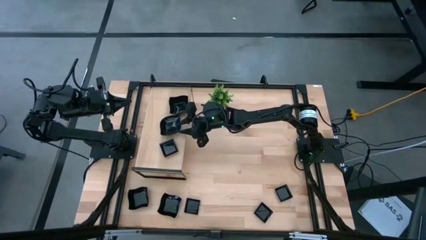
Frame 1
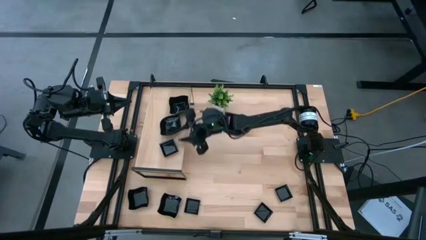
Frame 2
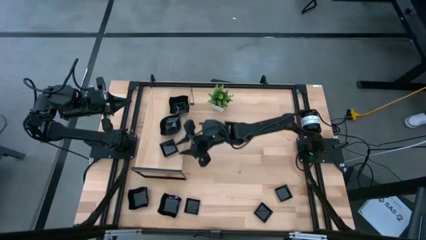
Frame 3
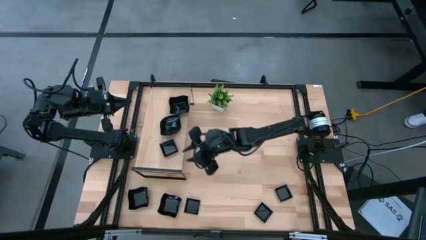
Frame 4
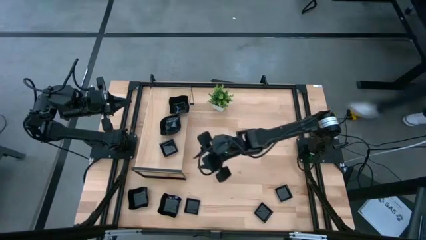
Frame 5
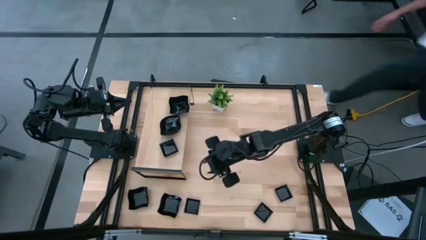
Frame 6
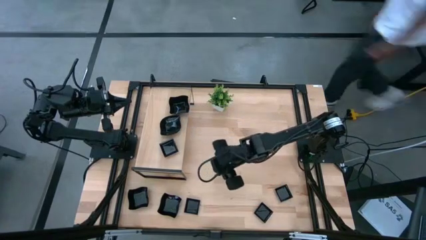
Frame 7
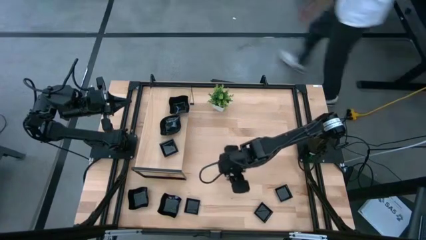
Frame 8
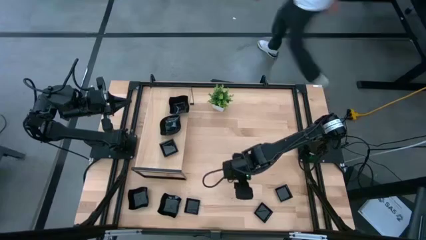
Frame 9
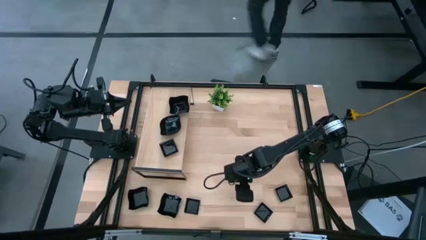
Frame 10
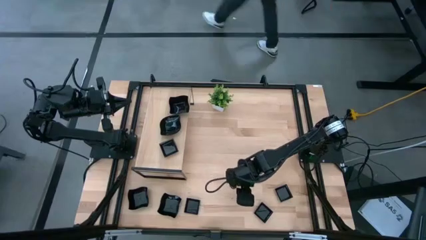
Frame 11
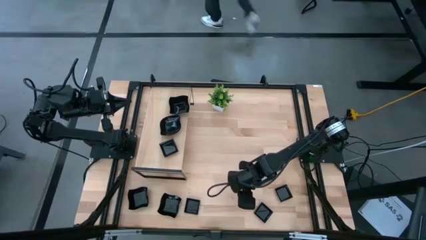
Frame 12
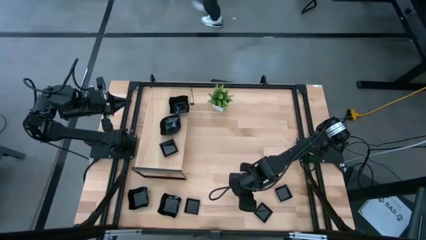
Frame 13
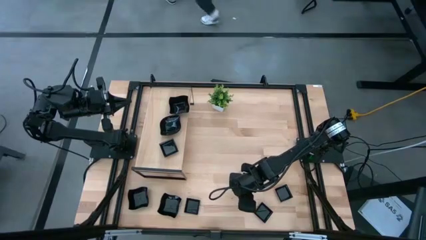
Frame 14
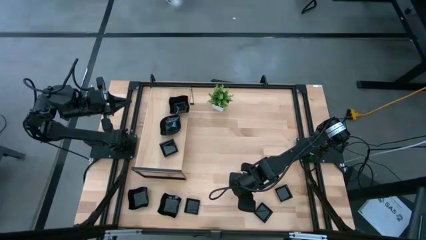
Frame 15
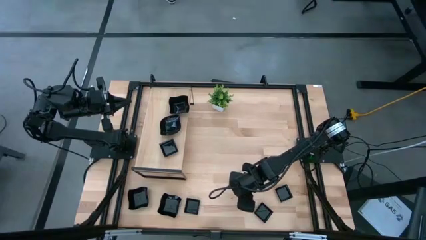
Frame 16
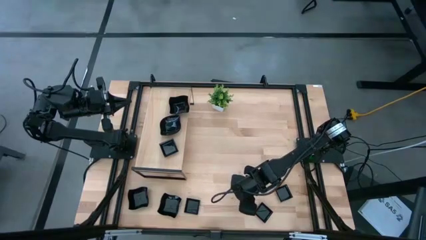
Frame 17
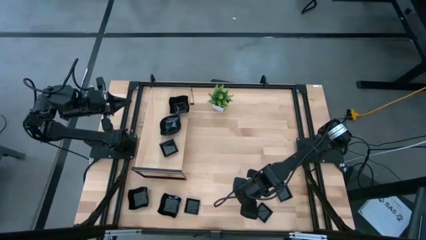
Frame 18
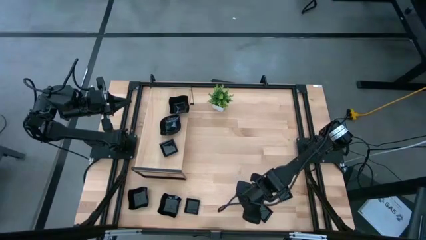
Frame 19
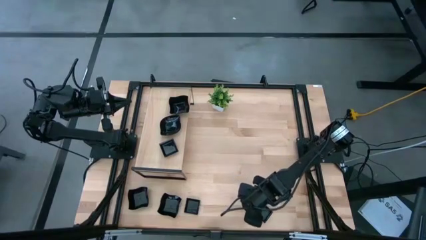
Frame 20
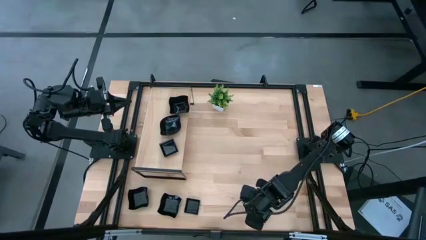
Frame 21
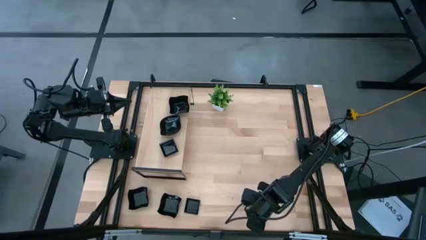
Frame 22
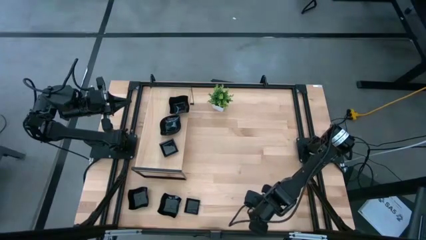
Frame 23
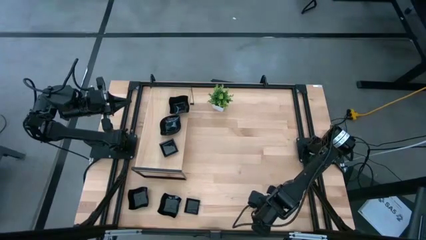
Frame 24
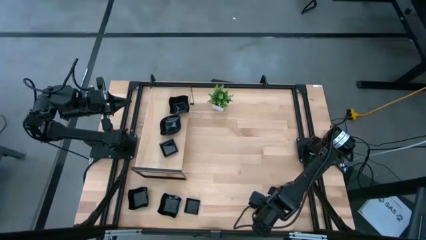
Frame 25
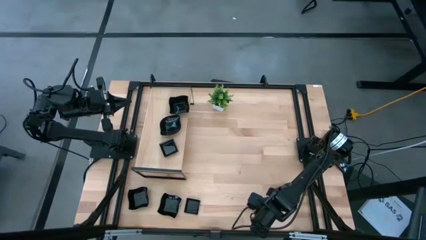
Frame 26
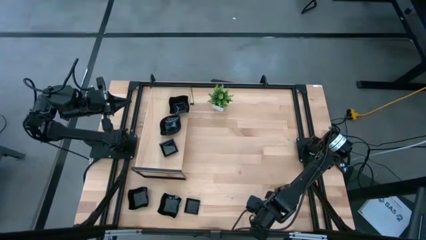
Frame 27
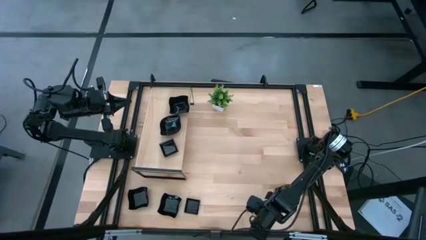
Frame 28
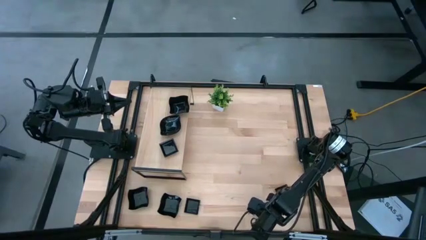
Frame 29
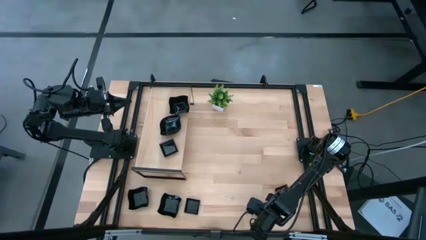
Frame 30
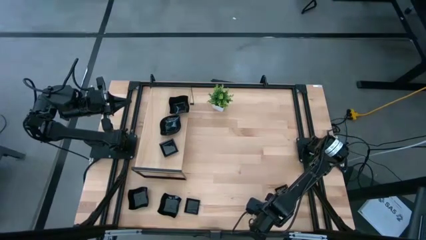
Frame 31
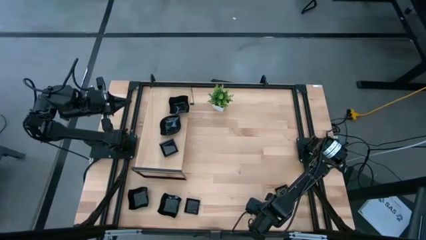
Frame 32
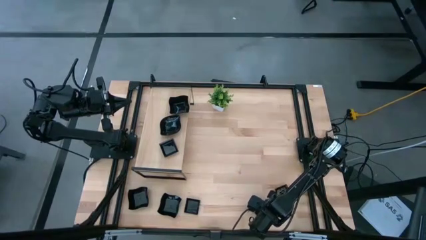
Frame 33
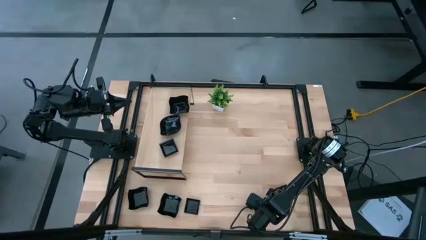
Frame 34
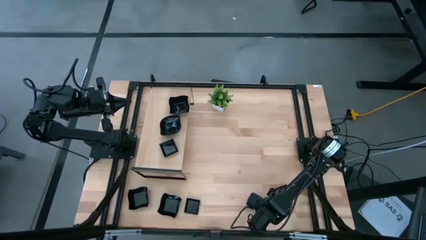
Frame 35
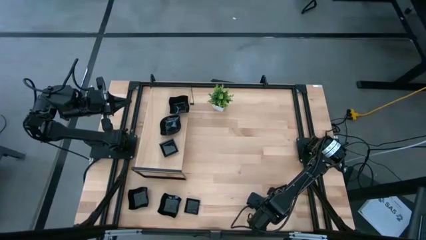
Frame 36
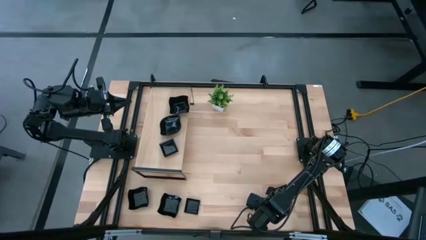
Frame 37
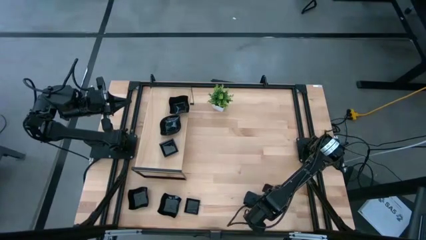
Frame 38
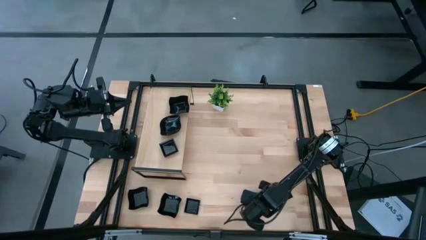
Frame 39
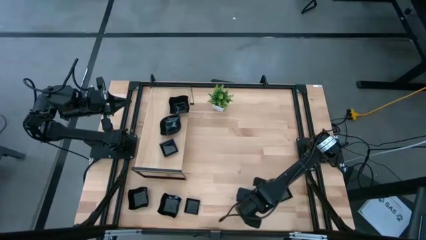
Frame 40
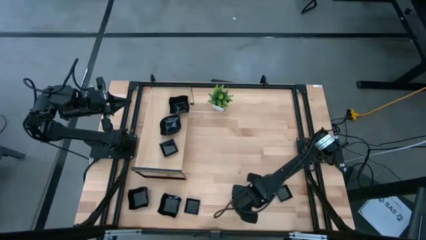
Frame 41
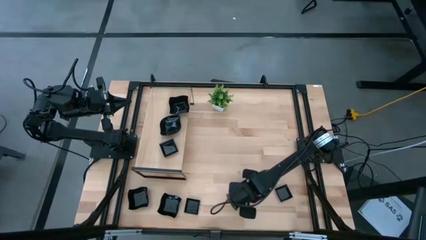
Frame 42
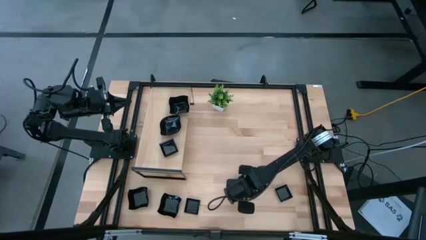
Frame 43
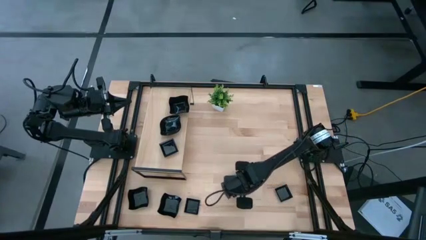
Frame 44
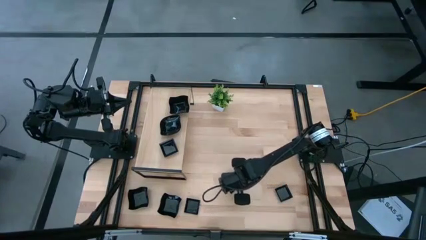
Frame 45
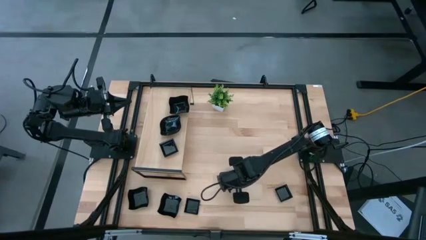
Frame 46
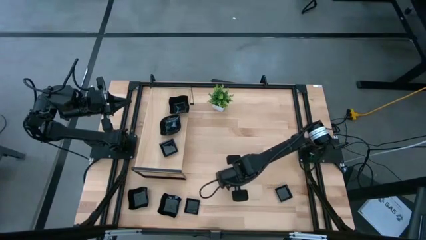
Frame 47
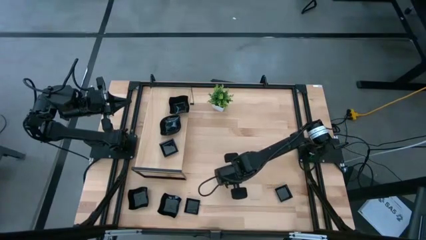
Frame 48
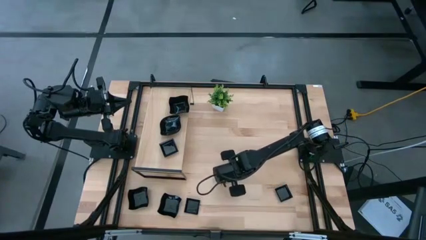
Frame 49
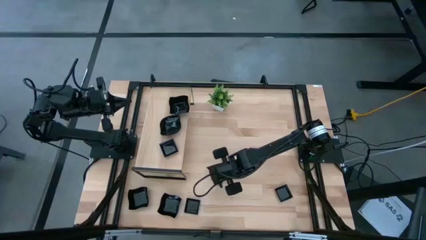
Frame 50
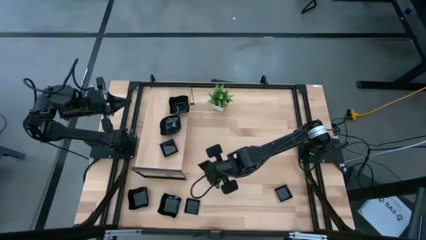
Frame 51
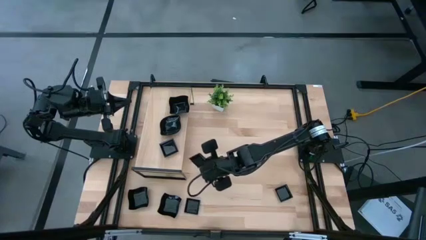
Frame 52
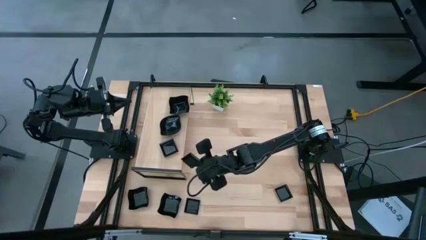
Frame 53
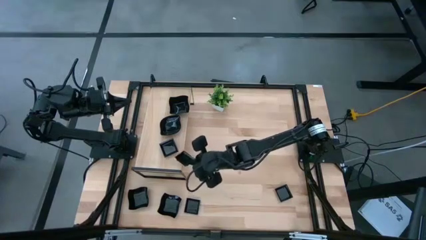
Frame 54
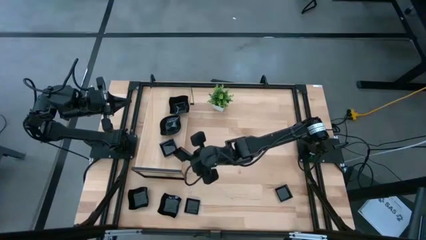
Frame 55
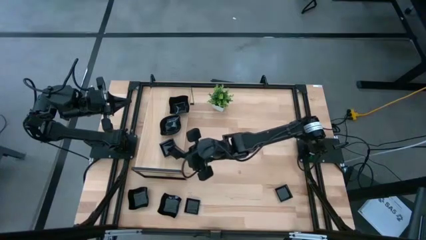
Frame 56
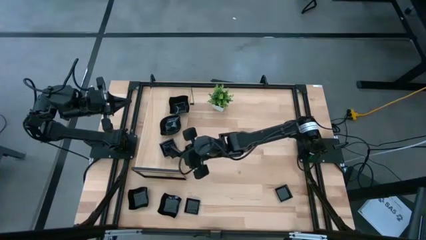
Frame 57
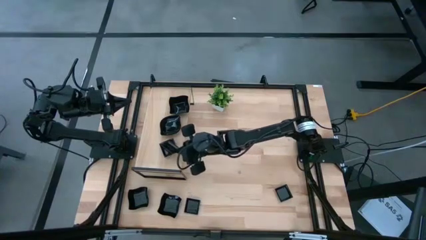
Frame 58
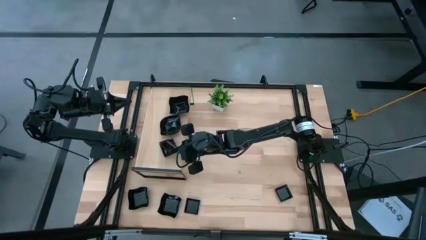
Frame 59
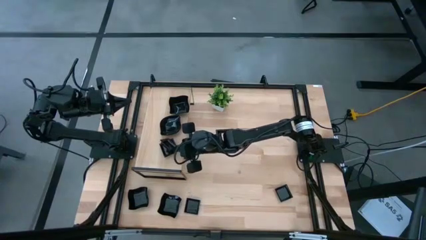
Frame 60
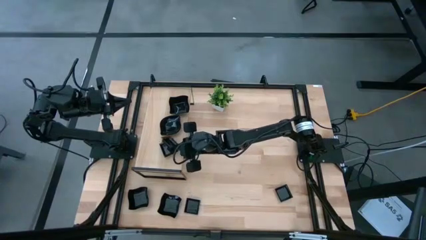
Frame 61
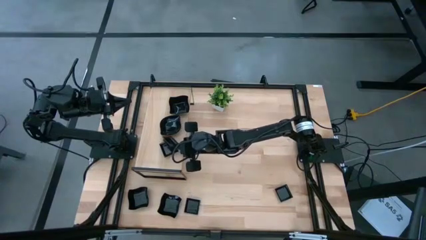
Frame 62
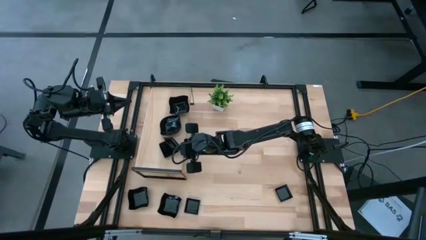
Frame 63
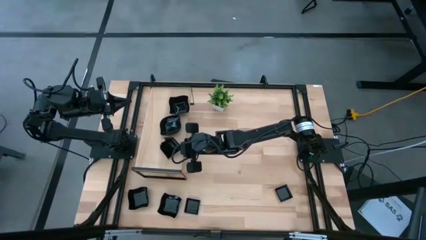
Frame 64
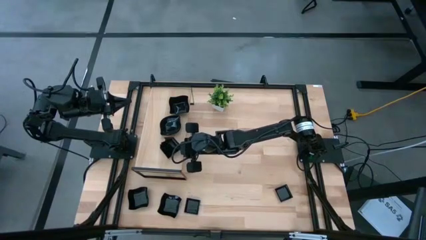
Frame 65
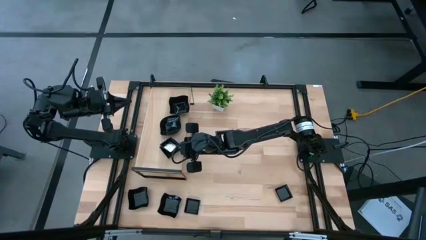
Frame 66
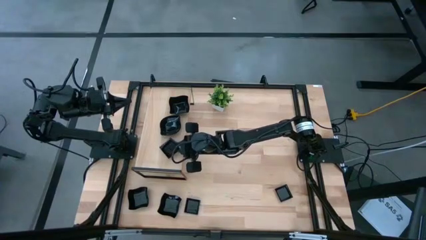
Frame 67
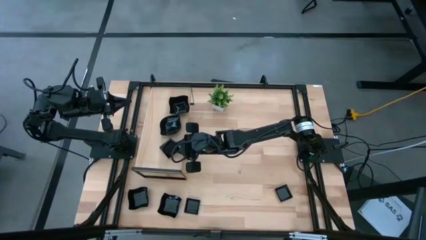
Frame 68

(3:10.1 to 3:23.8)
Task: Pick & Place Mini shaped plates
Stack the black square plate on top of the black square plate on the shelf

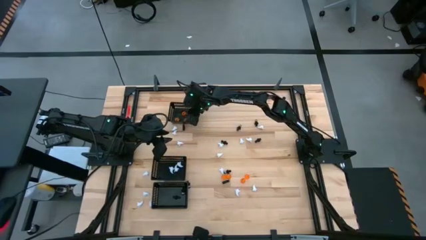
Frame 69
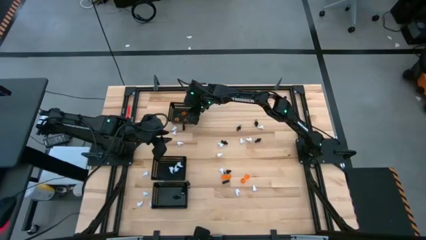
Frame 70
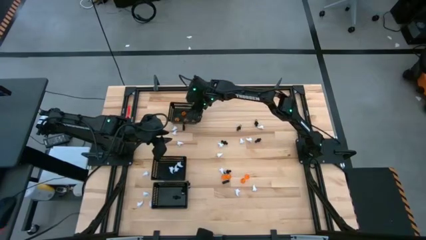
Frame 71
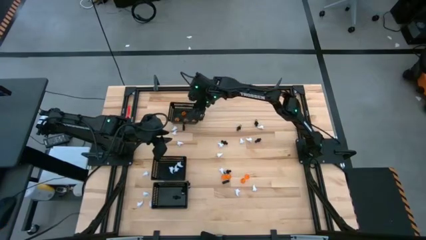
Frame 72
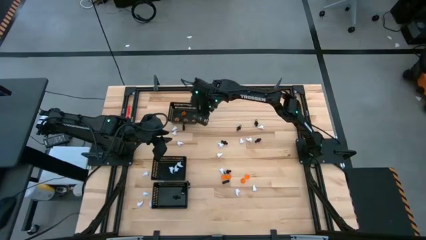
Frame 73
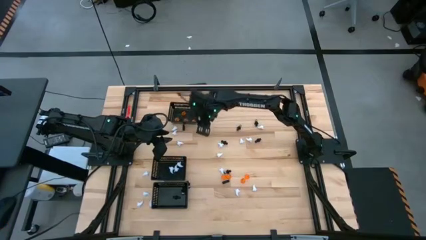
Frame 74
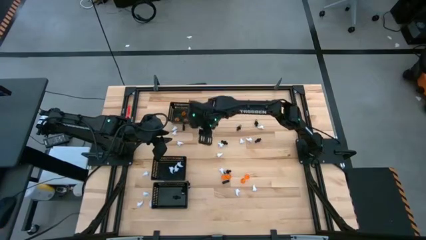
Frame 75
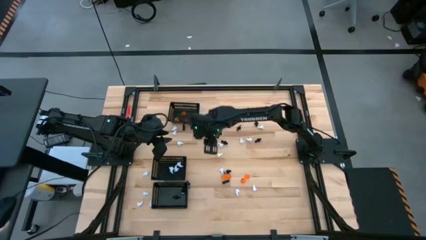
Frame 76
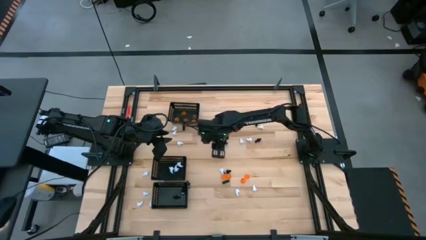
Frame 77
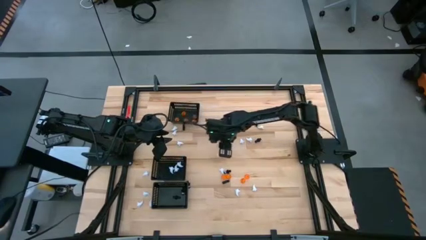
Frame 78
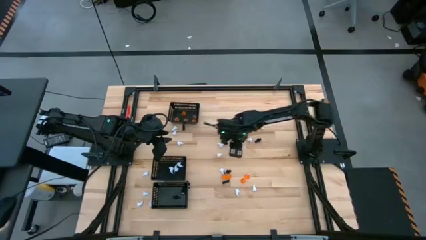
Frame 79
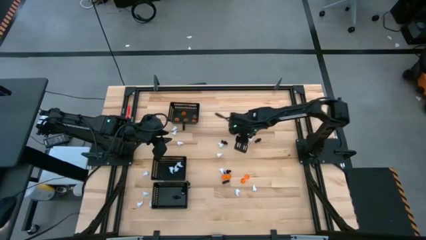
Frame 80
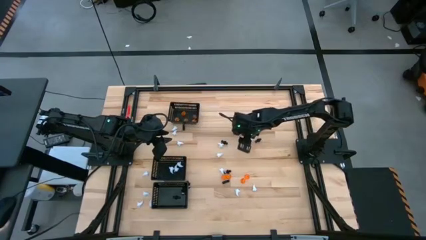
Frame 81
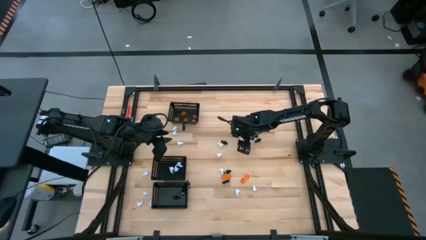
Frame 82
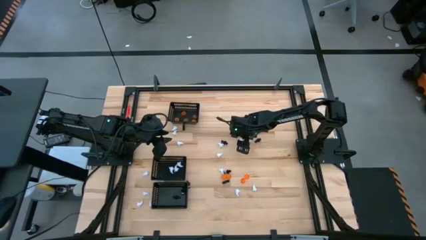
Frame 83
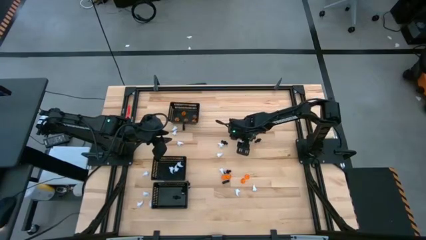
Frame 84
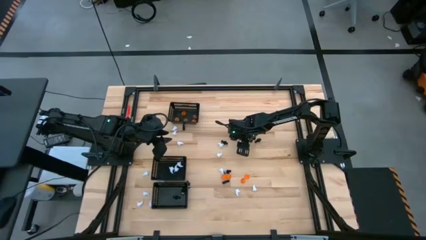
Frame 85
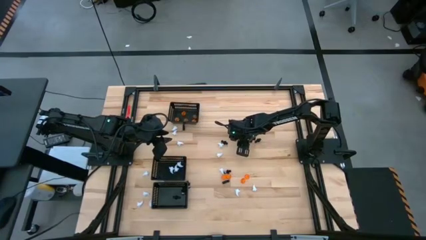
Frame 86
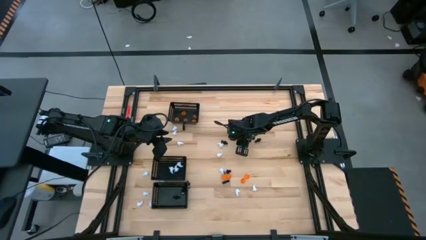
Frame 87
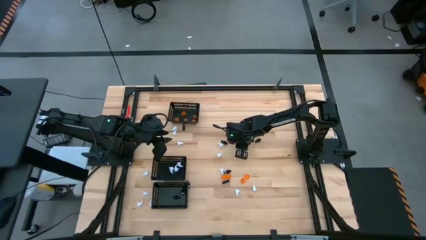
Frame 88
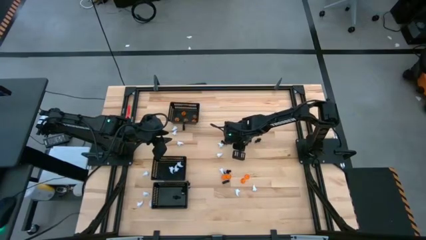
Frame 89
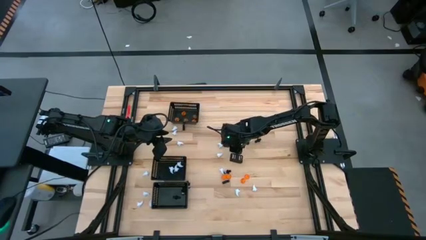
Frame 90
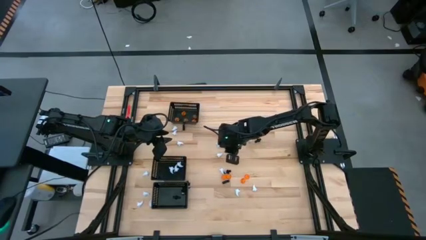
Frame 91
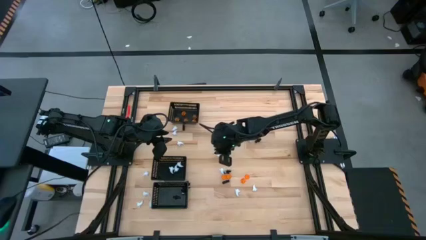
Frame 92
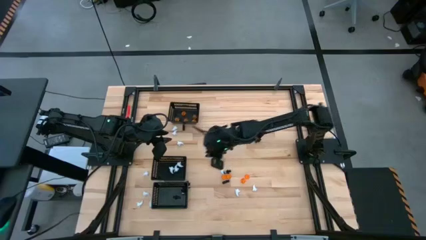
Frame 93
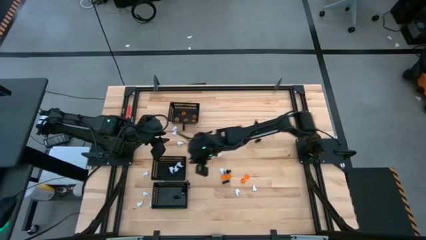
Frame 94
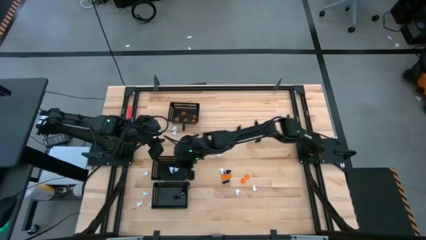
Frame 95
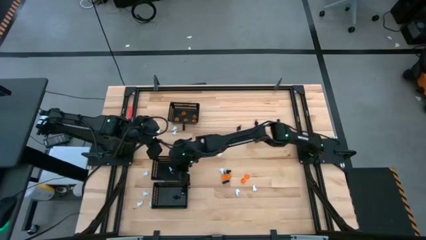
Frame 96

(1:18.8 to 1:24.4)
Task: Sort Halloween decoration
Put the white toy into the middle black bin
